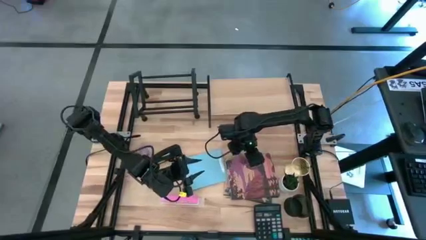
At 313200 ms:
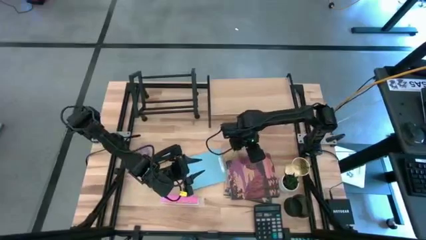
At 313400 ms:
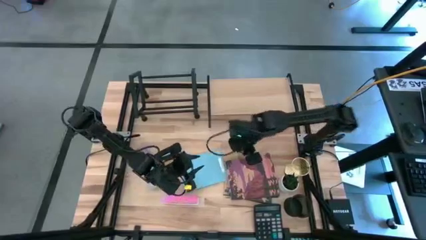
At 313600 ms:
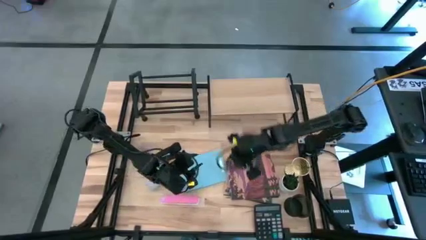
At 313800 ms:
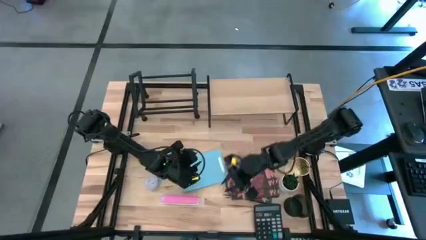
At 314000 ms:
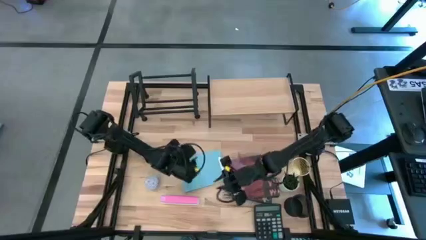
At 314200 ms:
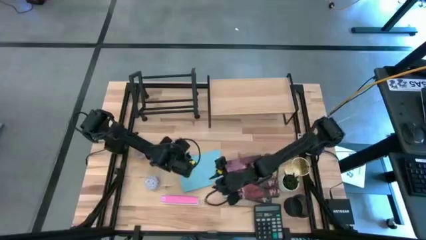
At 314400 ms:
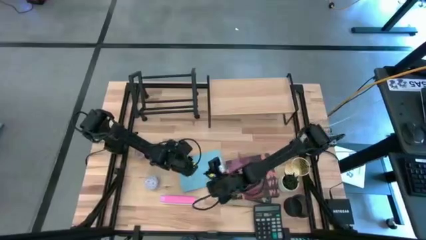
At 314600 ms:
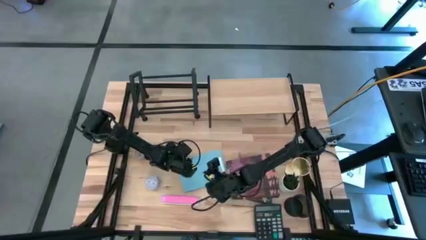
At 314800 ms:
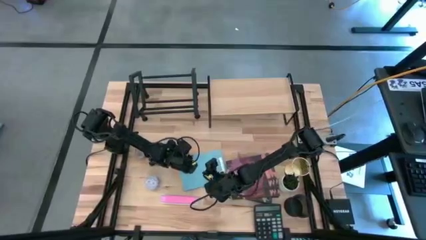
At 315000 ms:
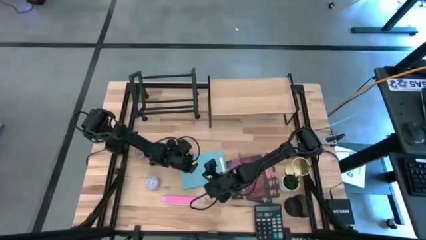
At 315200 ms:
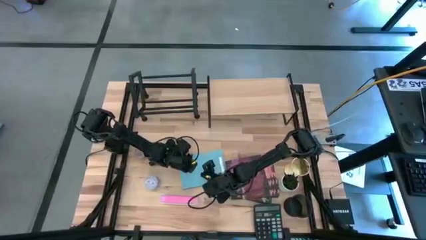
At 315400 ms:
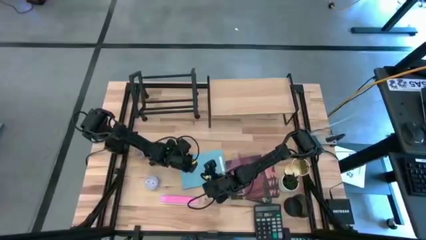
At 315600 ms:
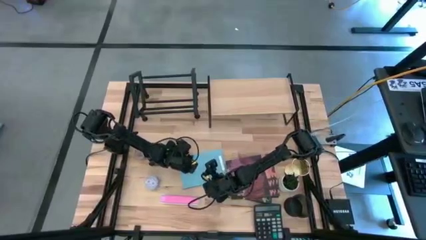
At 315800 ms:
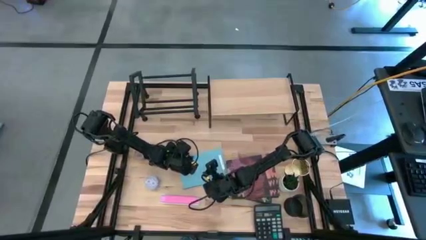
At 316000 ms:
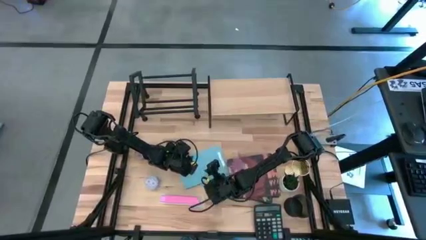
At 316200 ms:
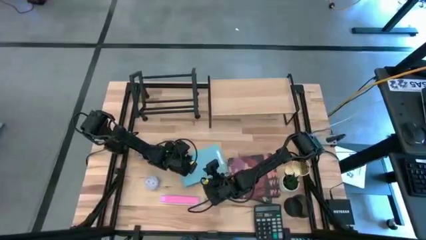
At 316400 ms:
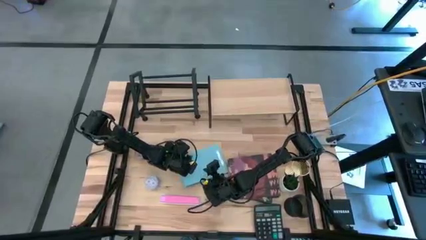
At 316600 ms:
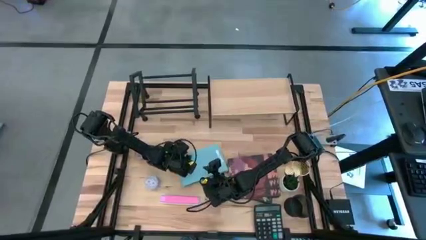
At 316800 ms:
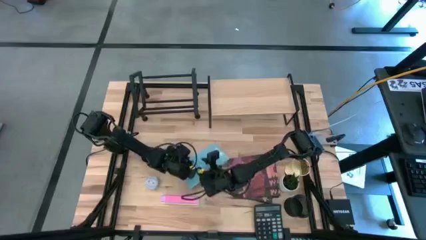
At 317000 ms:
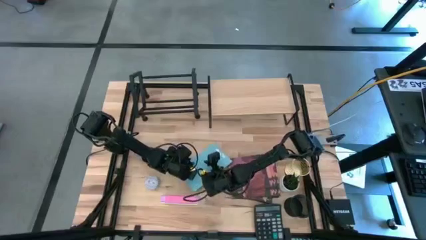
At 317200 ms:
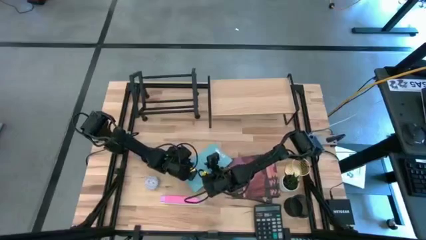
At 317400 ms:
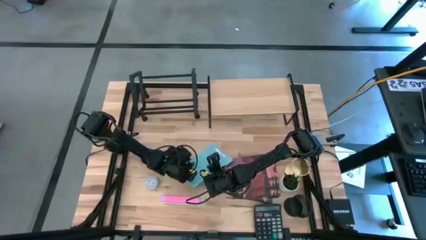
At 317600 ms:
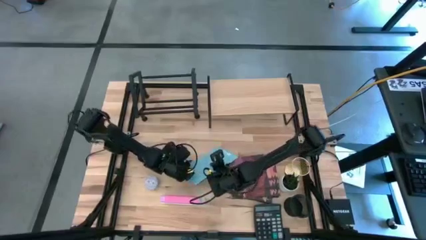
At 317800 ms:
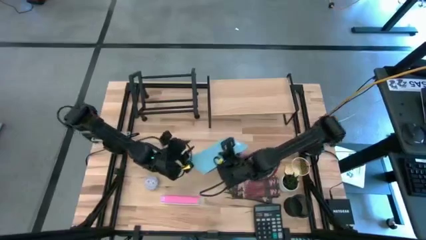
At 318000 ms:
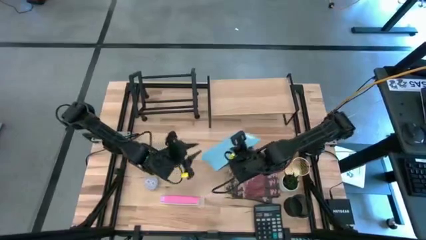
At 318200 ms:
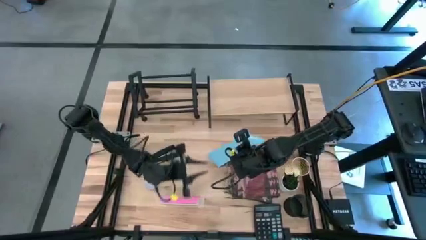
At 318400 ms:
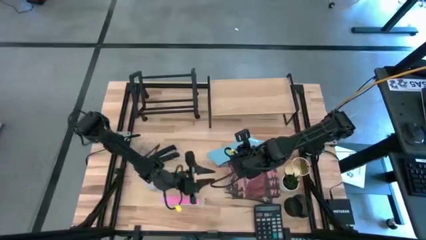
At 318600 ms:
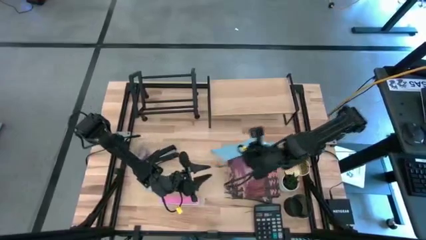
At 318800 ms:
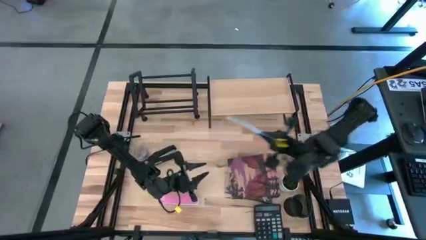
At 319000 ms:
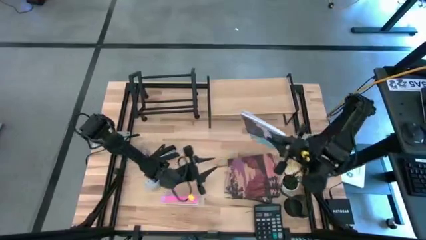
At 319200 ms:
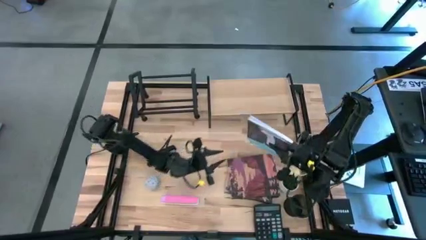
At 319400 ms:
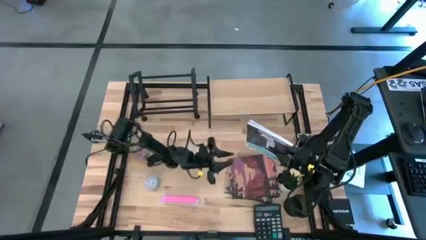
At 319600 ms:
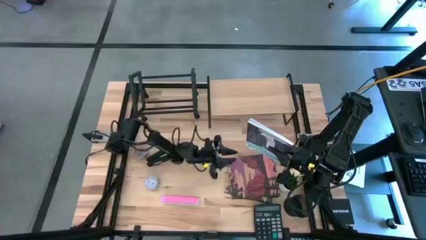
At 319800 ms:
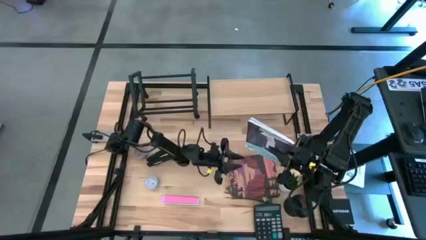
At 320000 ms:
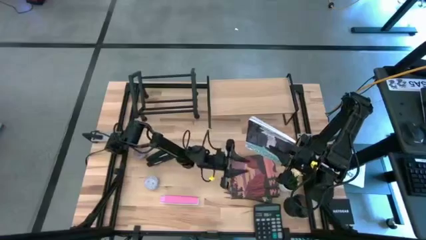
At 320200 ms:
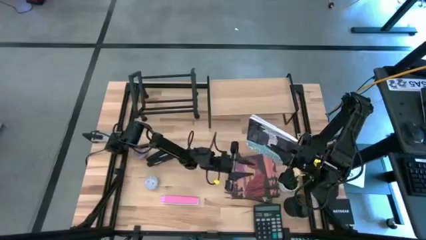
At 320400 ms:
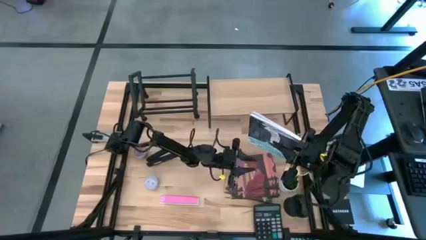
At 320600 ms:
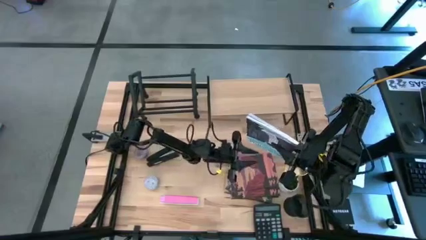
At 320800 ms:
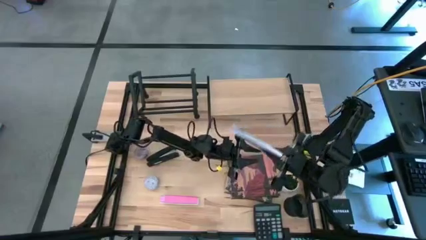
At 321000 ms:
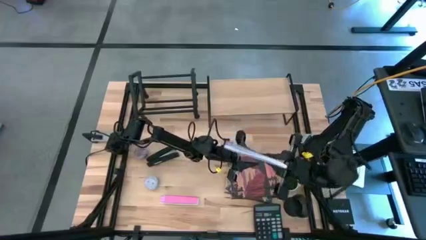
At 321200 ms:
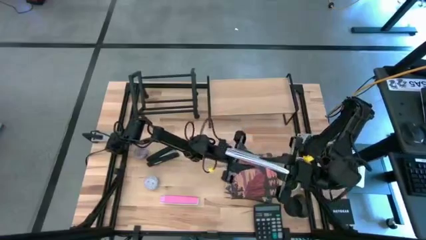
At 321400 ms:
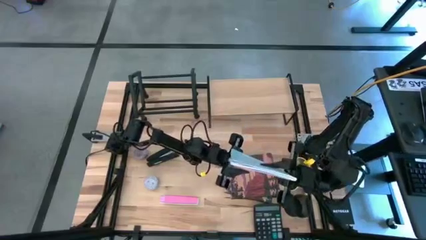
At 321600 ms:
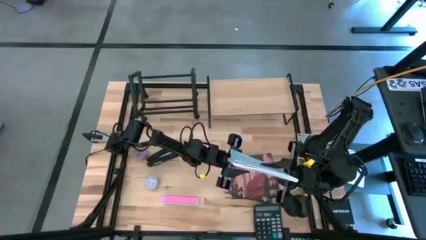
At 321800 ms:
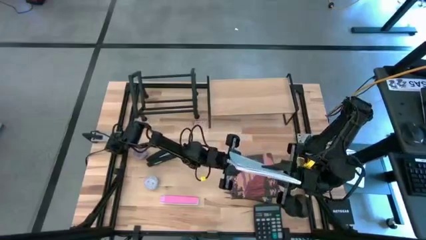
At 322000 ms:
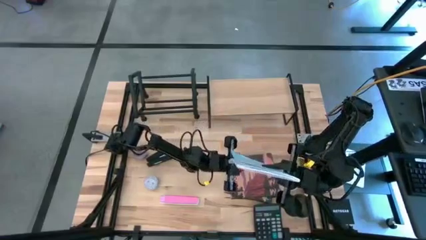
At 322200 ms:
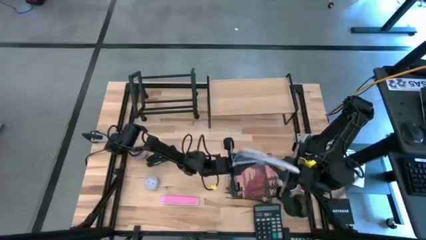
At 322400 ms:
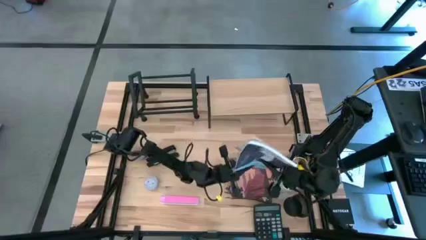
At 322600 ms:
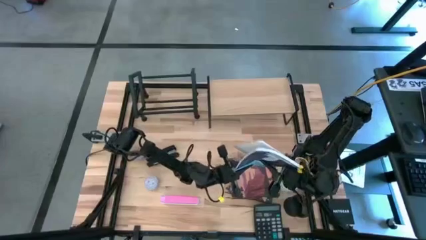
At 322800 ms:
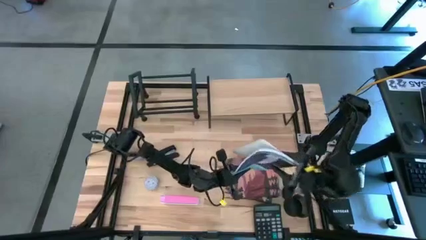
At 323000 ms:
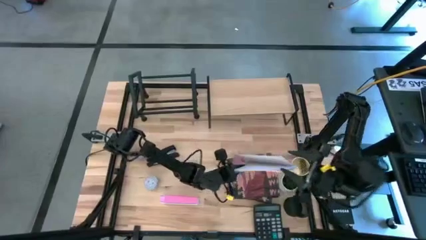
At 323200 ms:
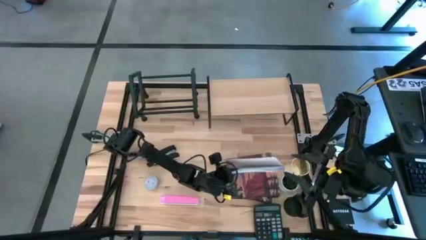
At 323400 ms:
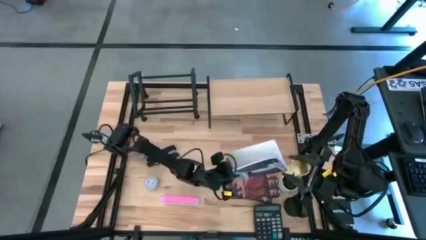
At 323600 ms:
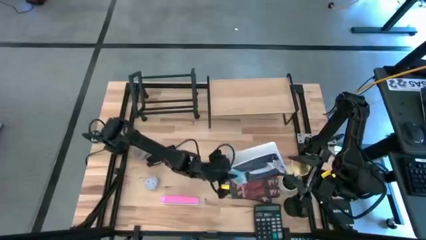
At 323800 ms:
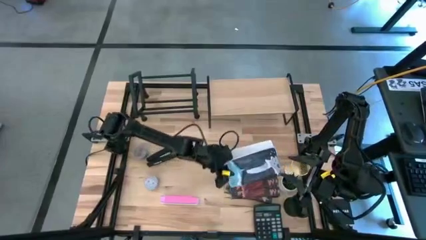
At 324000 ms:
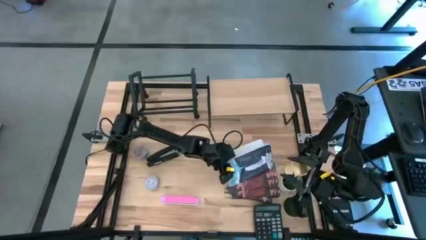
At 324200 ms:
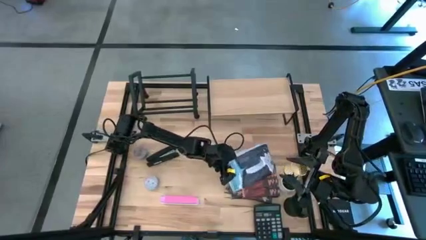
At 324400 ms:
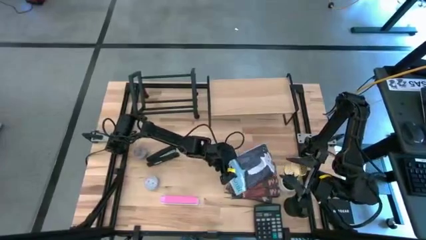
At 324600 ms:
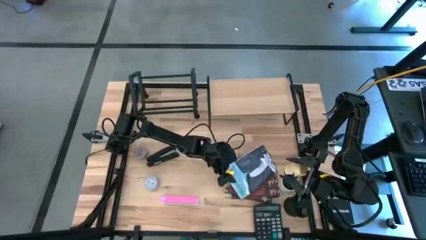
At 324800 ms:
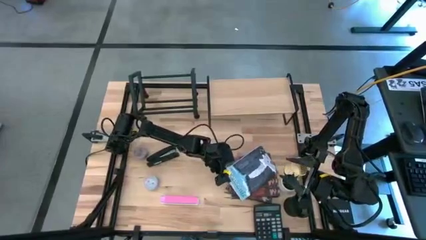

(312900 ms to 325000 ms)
Task: Stock shelves
Stack the blue book on top of the brown book

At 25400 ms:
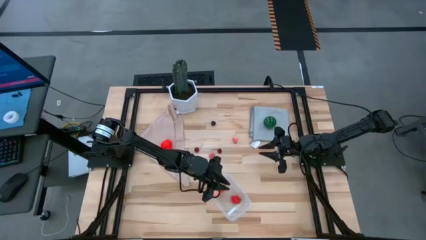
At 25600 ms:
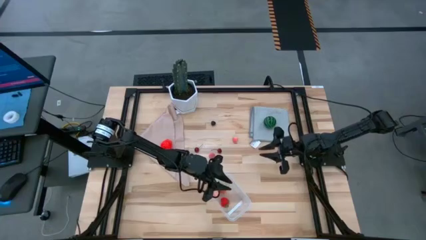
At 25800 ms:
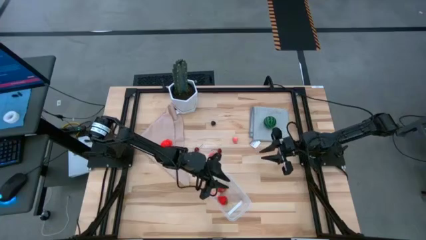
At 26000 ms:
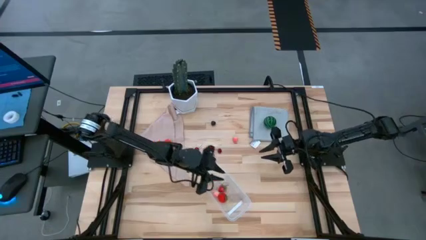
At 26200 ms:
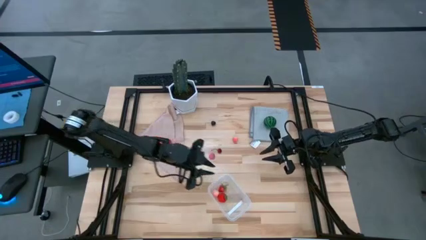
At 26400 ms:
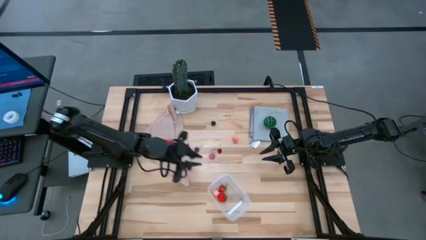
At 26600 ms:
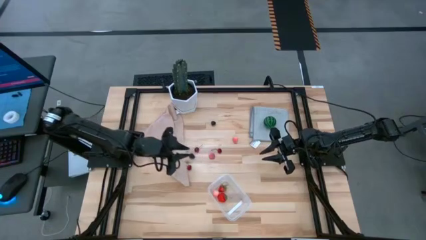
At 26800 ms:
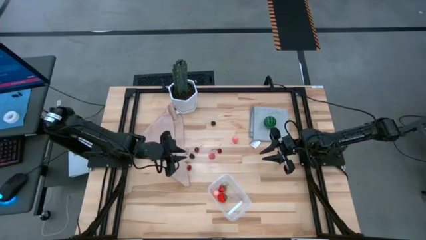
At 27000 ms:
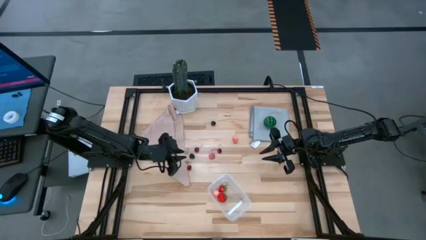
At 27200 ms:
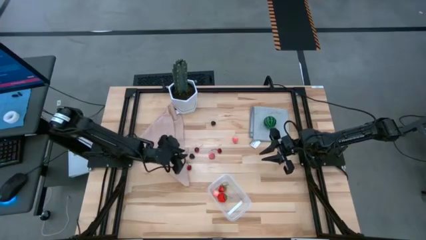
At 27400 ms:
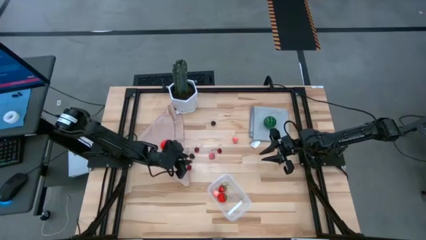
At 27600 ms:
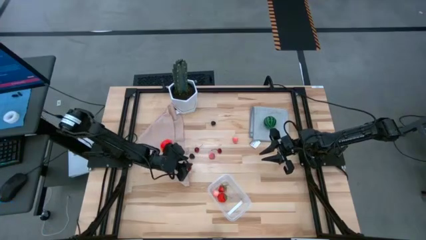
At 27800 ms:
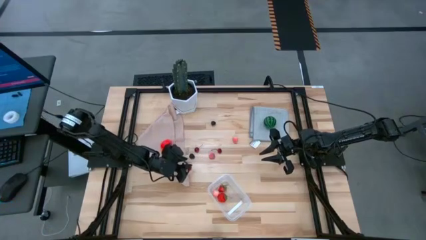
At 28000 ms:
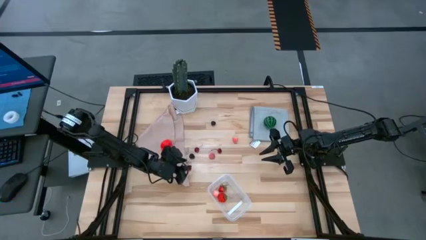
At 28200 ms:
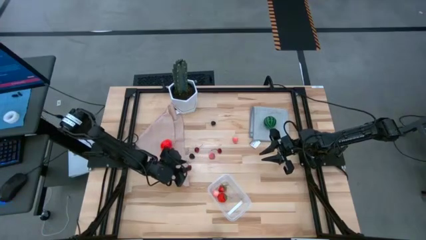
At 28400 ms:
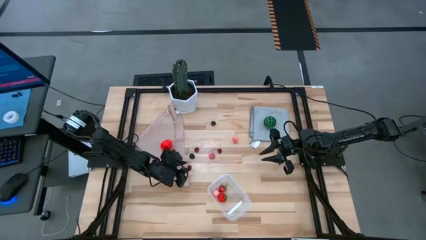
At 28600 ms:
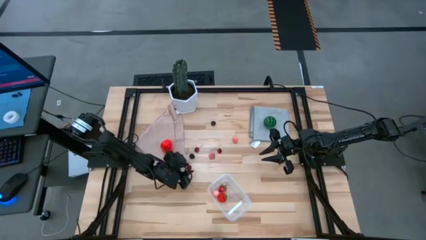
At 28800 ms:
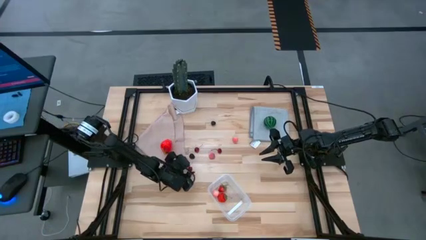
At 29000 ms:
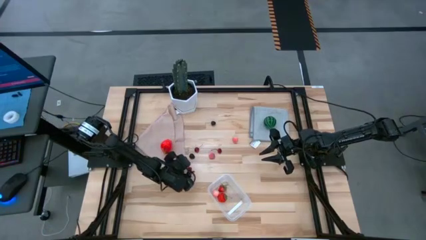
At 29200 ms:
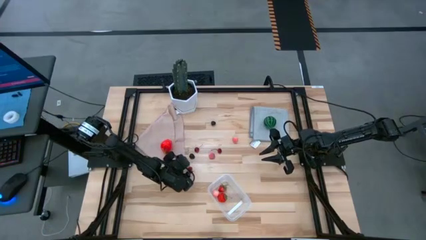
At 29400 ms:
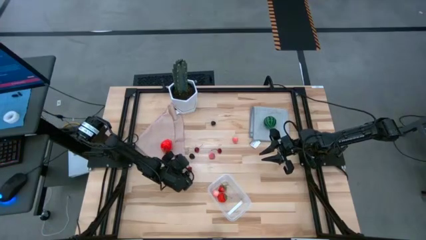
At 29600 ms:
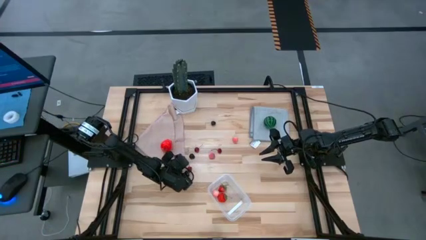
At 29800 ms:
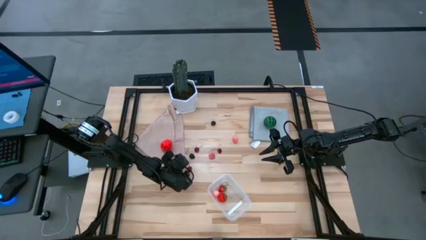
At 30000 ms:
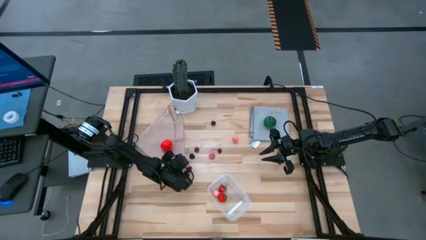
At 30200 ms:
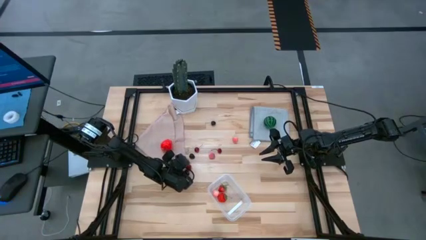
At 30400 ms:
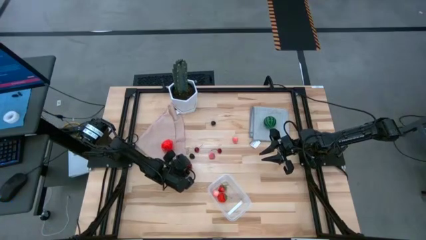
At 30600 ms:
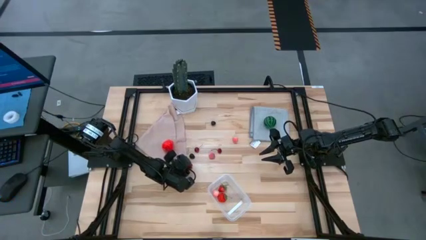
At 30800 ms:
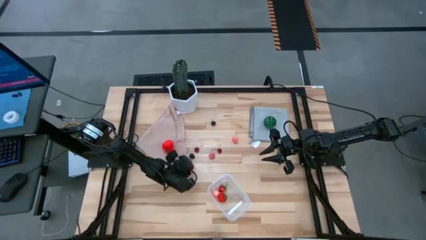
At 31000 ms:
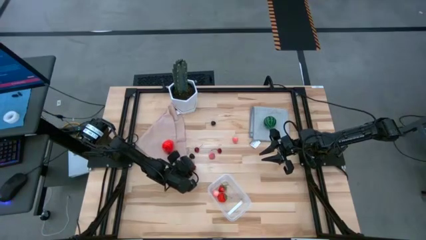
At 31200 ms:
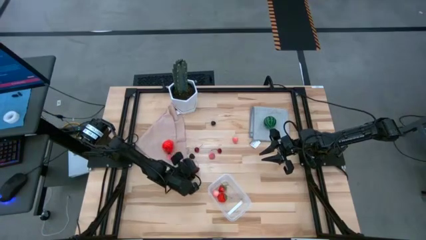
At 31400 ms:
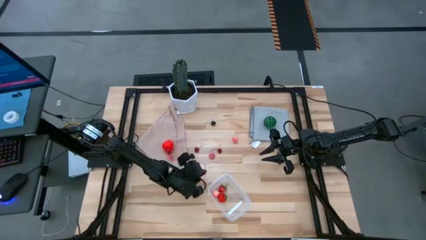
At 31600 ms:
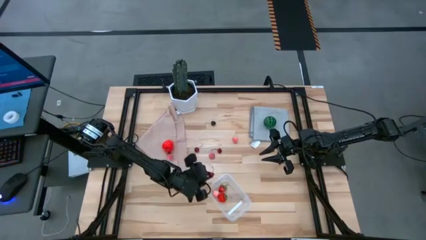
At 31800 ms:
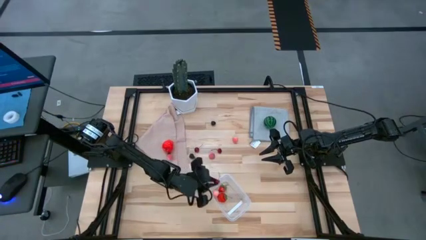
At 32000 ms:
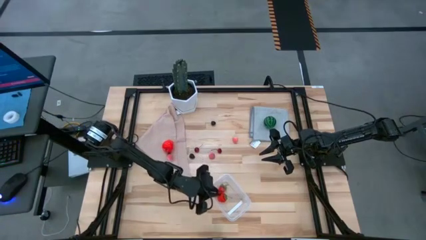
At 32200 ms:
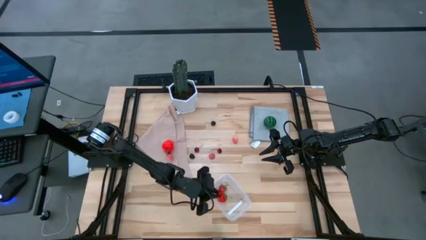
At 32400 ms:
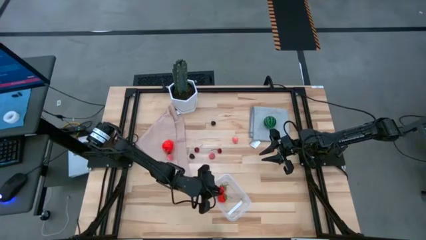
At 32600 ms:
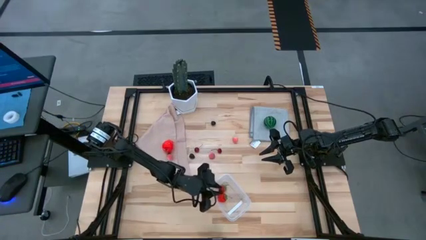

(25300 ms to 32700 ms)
Task: Pick and placing Produce into tupperware
Put the bottom red cherry into the transparent bin
